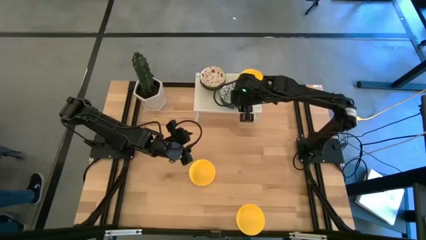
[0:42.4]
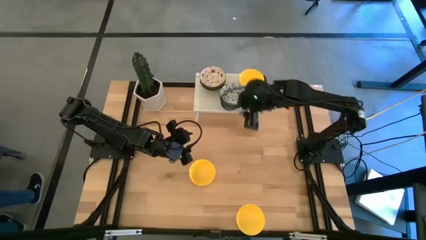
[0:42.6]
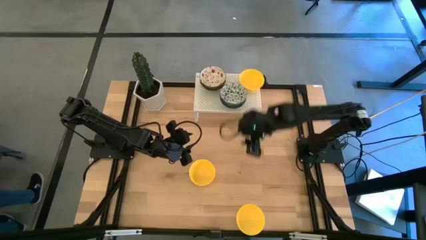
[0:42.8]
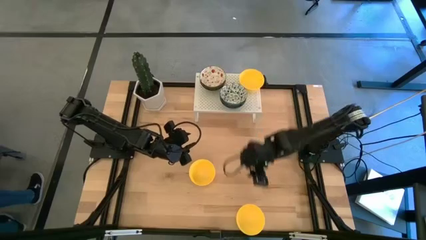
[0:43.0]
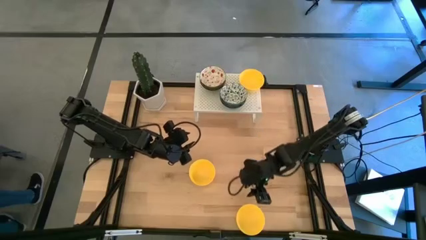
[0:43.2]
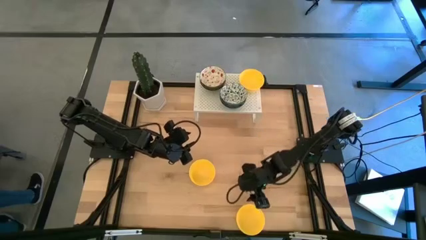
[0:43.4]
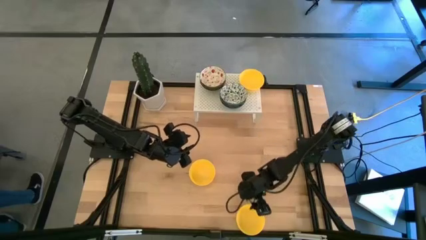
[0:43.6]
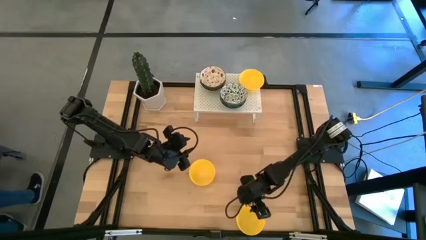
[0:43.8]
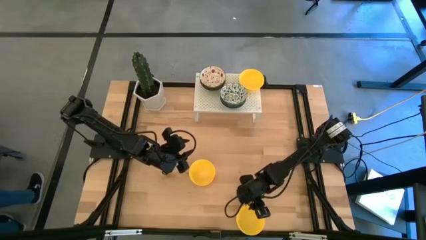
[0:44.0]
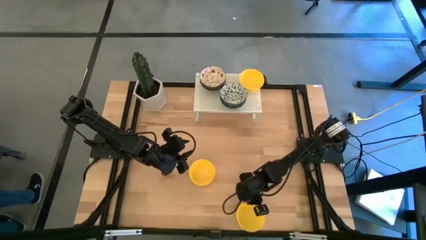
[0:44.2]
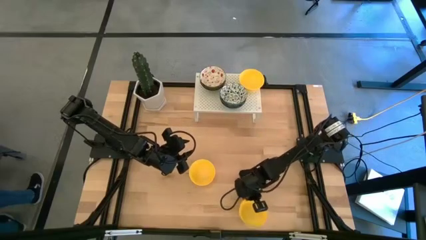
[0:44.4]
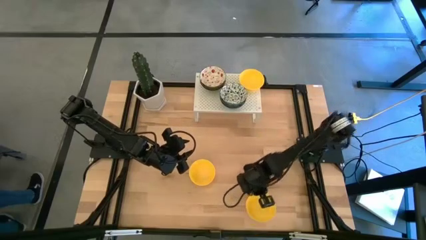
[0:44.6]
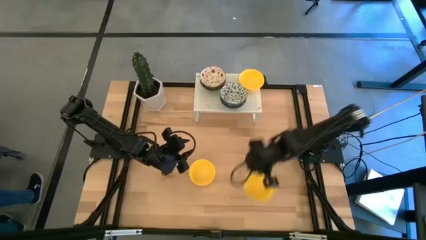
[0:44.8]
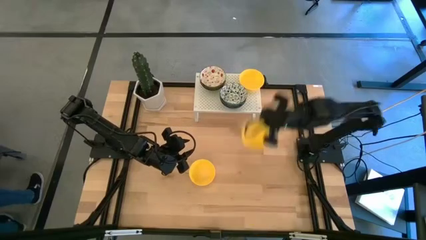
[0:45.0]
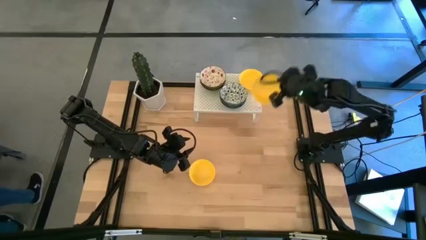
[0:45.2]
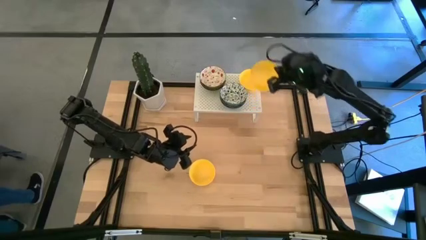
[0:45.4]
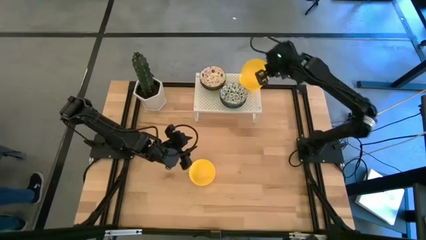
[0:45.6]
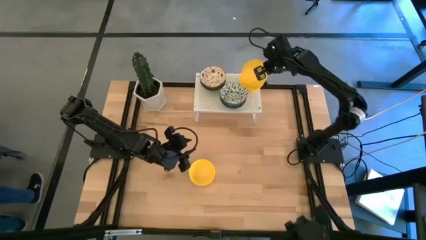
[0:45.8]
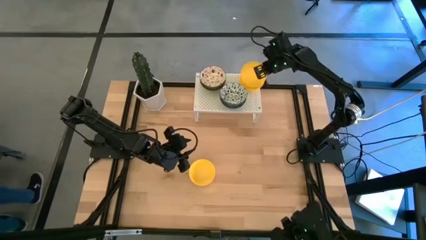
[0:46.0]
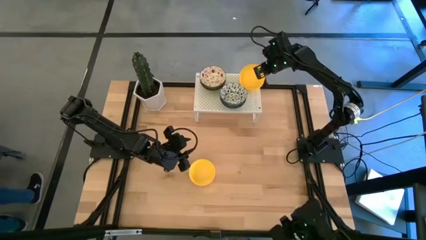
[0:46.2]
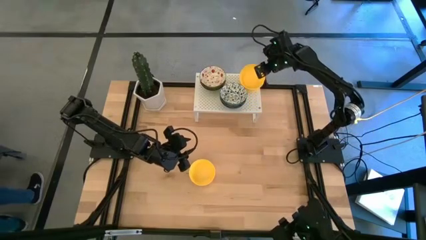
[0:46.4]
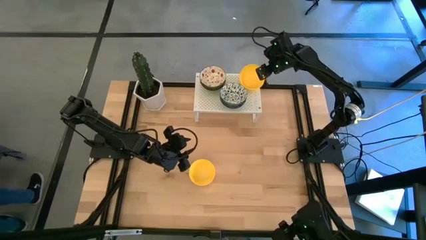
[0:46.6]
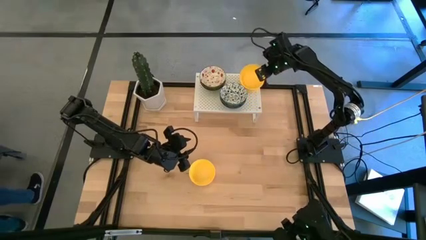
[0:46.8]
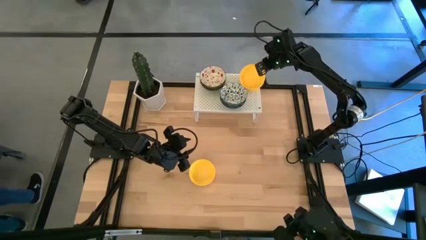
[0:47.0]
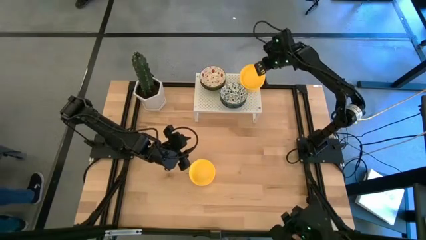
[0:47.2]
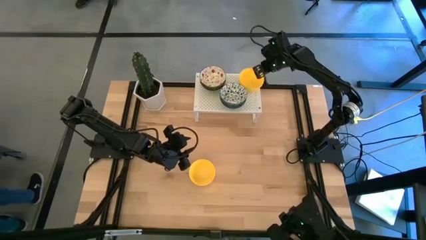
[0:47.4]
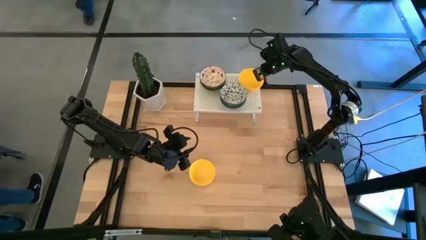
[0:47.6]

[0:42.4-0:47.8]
Task: Pick & Place Mini bowls
Stack the bottom yellow bowl on top of the yellow bowl on the shelf

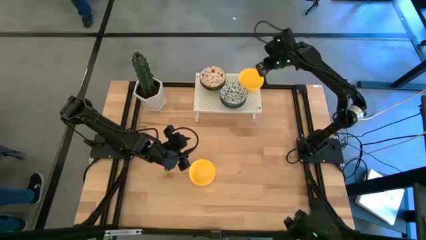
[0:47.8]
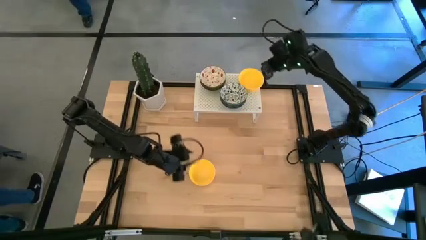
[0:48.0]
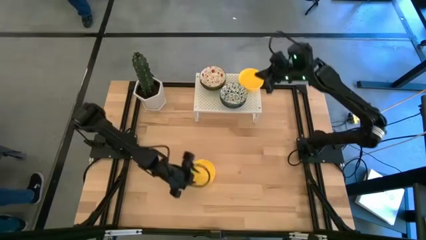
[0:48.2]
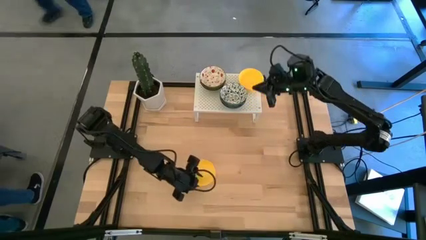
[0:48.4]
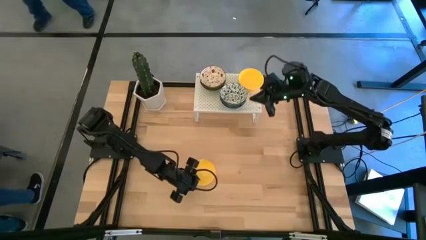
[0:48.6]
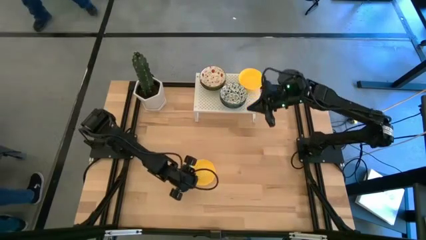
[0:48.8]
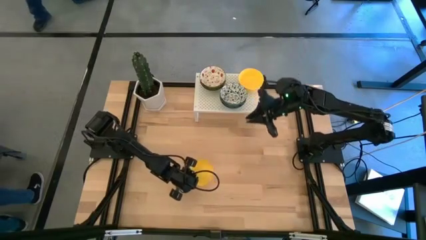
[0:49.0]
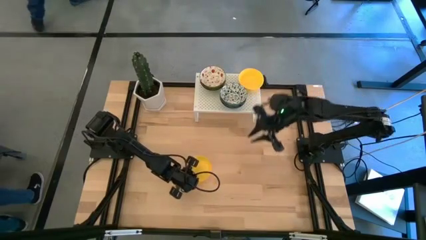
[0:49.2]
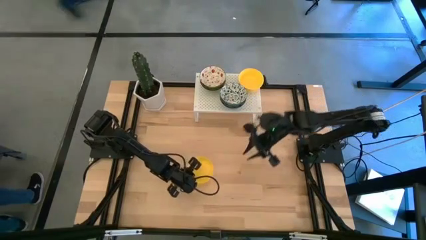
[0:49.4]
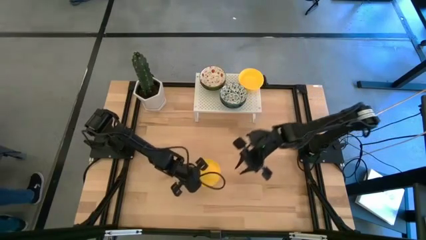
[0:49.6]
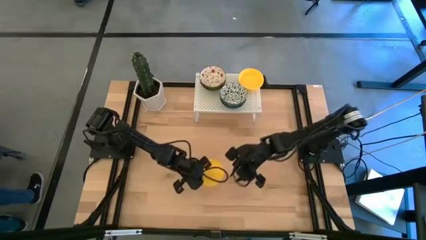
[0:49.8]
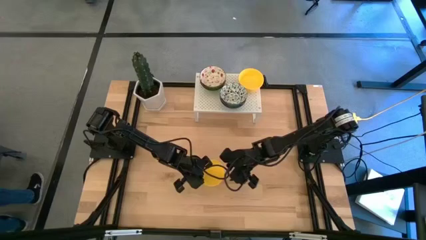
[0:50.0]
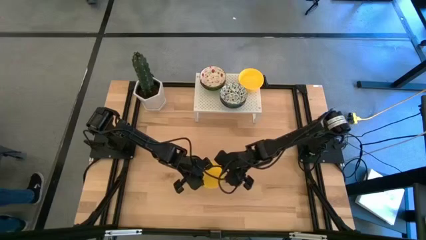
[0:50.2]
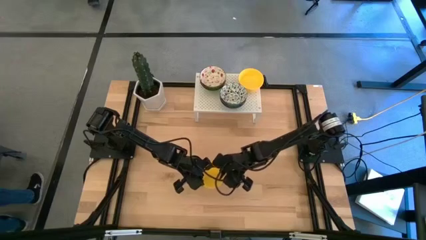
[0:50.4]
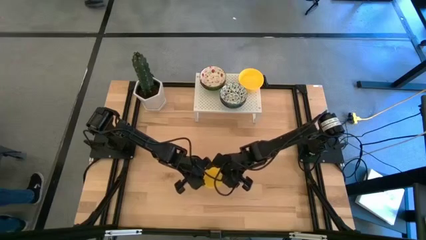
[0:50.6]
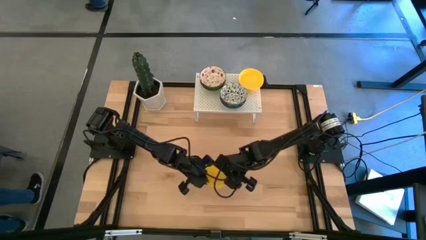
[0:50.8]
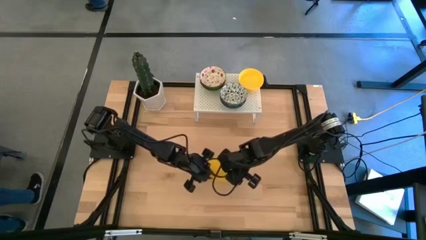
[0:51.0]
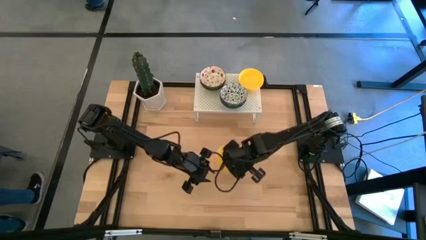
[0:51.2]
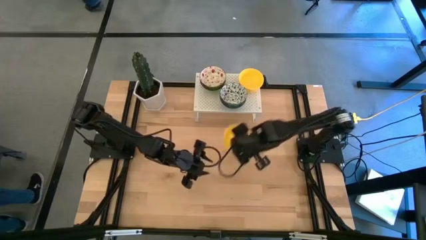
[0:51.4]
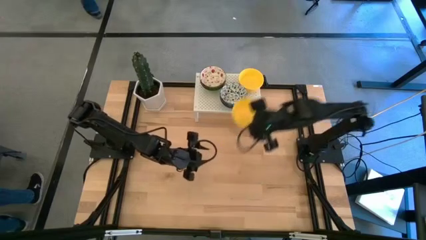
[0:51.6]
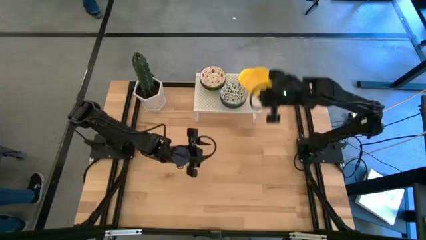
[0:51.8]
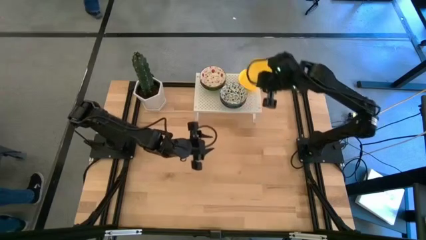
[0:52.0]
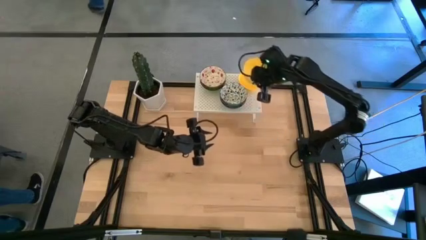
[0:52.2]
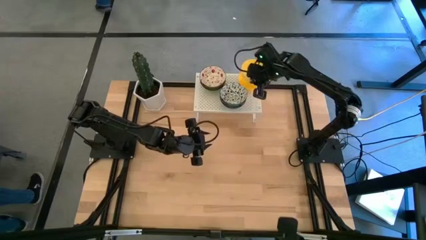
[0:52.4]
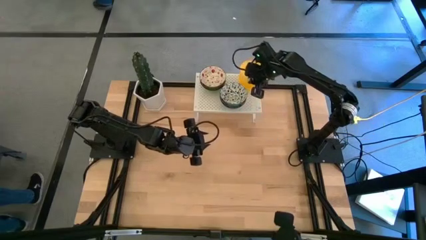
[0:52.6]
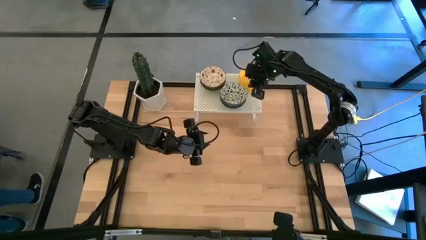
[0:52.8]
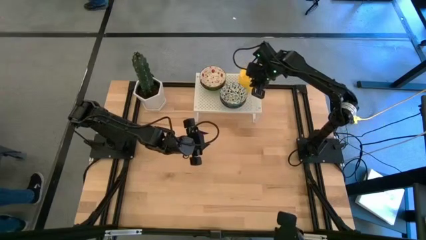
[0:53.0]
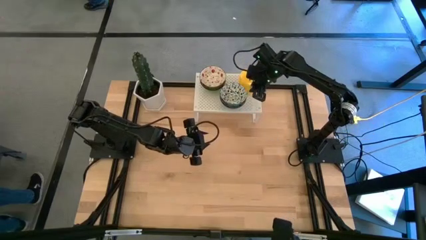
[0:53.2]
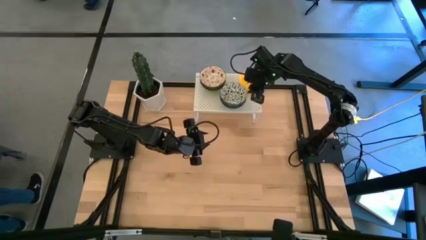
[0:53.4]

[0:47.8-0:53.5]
Stack the yellow bowl on top of the yellow bowl on the shelf

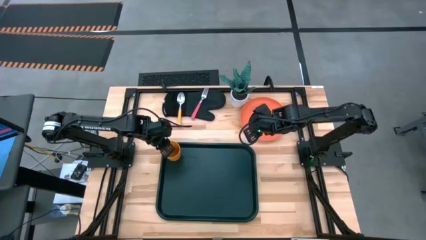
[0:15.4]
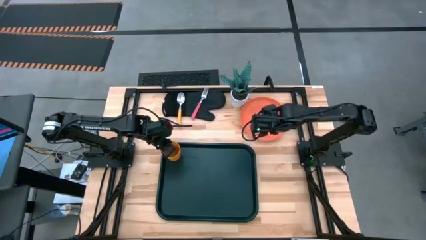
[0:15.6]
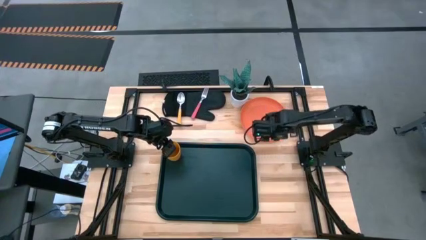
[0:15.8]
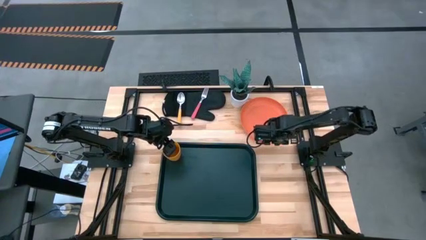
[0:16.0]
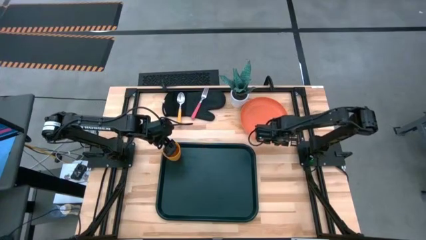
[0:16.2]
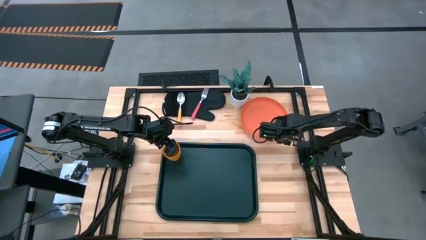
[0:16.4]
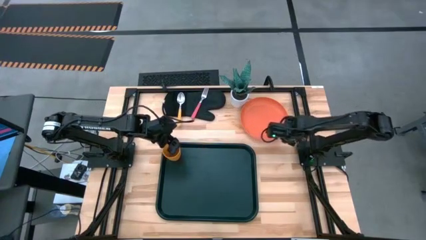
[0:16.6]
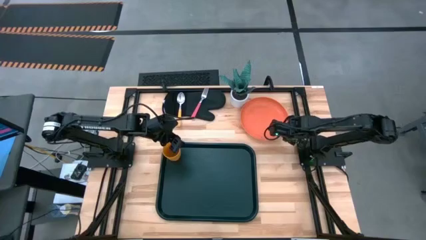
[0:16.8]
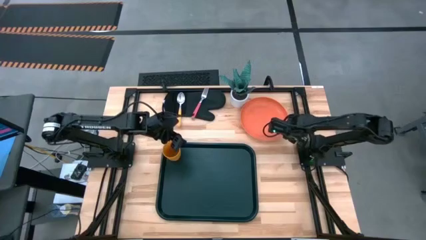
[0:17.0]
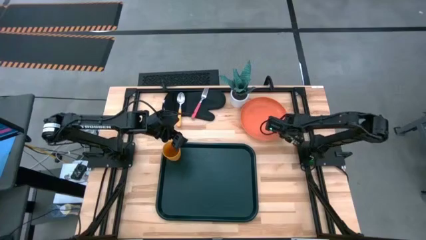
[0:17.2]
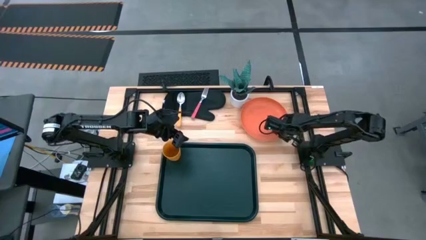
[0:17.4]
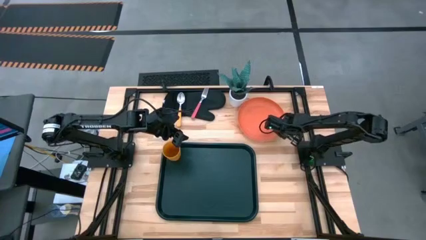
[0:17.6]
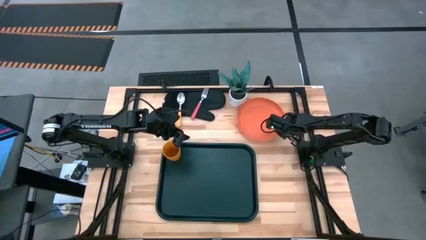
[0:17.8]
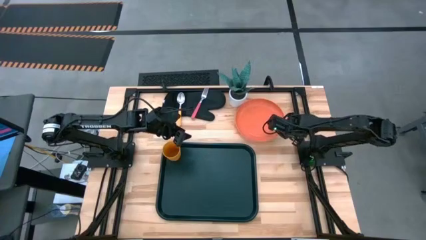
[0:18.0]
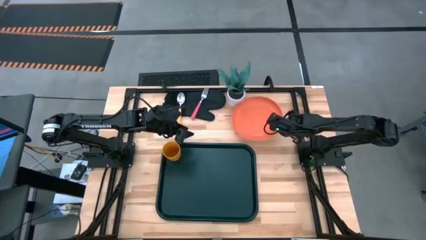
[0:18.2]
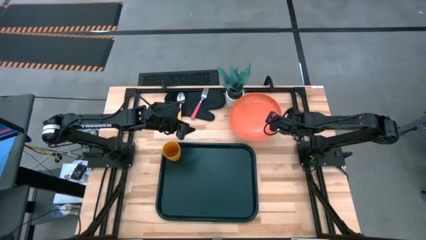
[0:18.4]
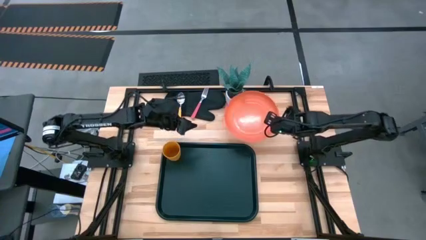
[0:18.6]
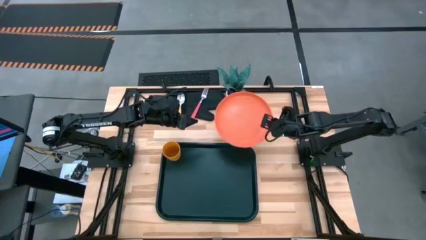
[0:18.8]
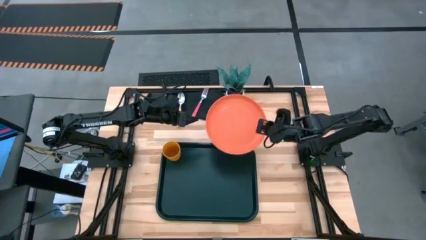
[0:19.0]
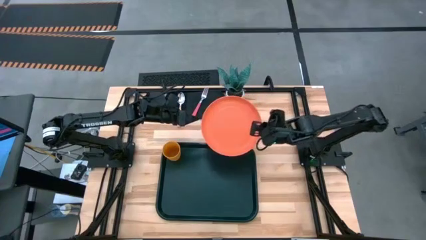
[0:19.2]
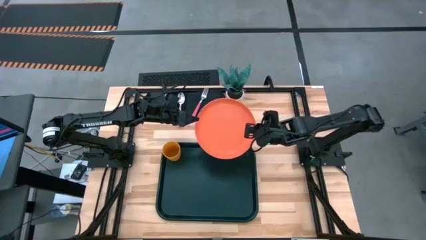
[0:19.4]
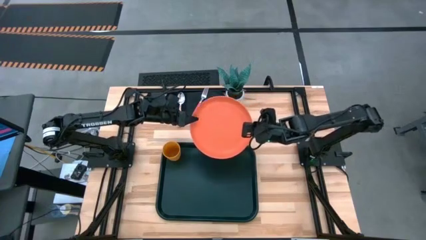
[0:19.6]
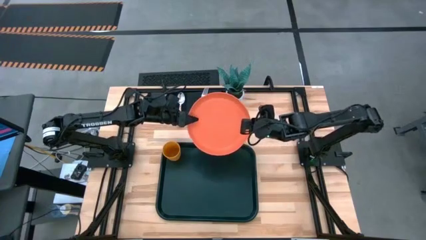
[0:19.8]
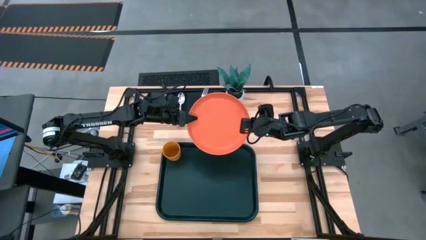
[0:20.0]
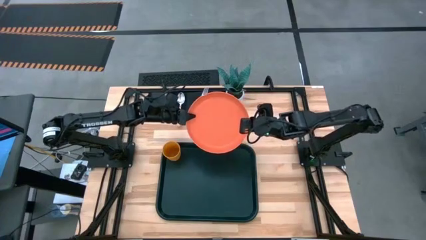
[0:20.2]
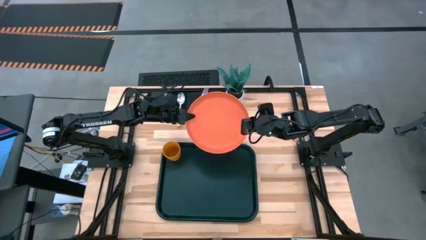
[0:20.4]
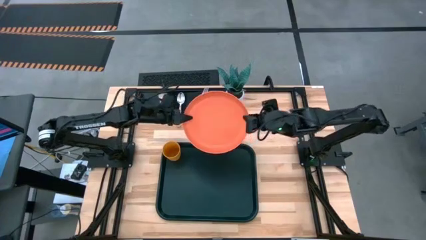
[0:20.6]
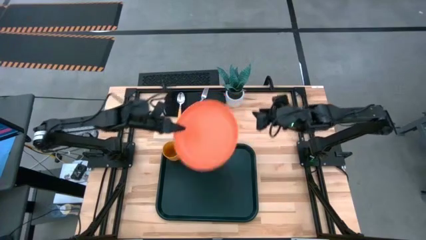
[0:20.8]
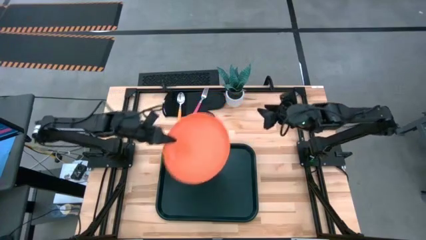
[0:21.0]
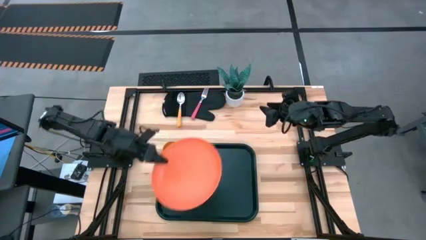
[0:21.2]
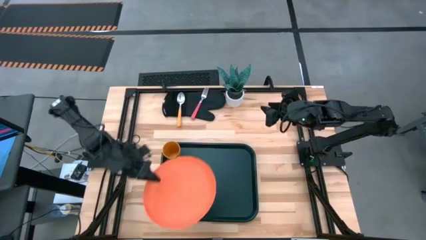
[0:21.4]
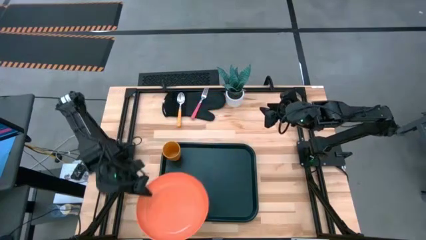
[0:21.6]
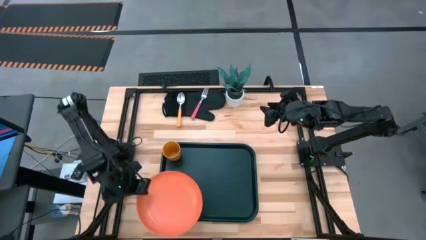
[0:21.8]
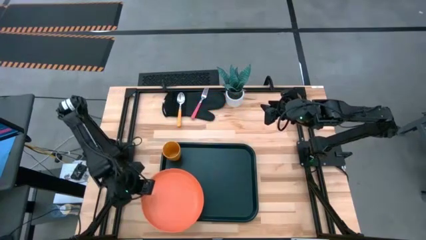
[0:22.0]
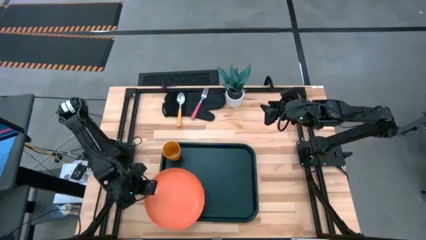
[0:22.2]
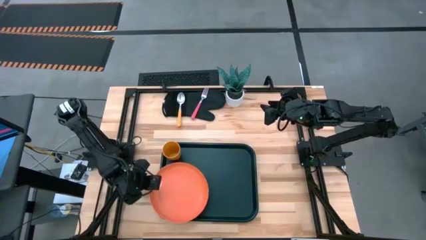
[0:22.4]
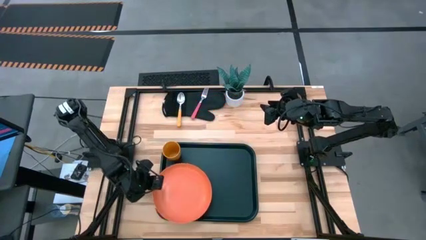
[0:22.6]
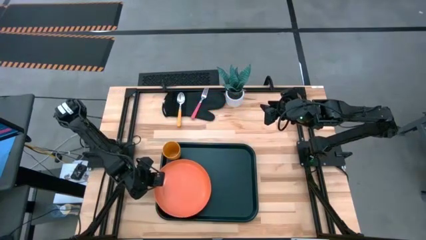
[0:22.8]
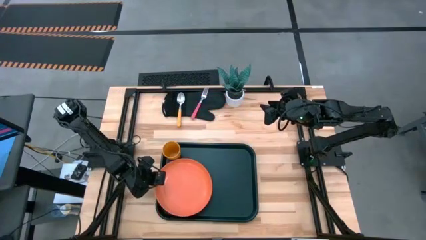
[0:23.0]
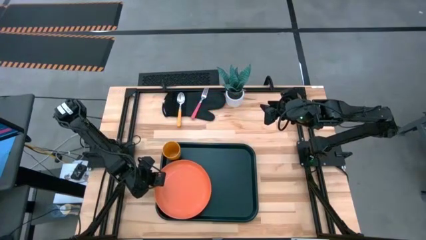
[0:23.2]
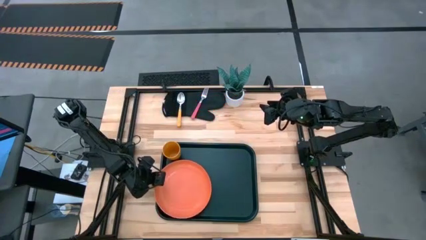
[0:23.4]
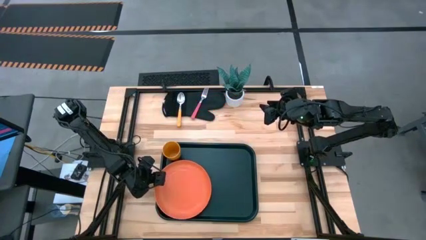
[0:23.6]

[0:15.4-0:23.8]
Task: Pick and place plate/cup/fork/spoon on tray
Put the orange plate under the yellow cup on the black serving tray
